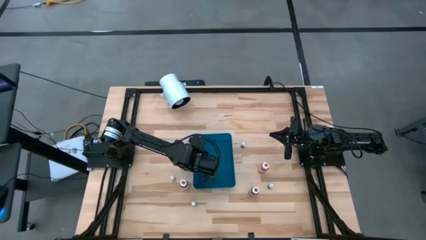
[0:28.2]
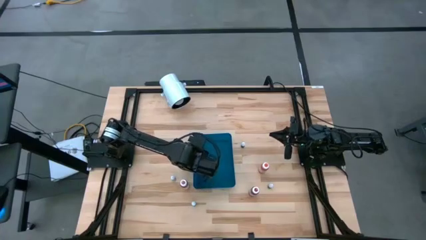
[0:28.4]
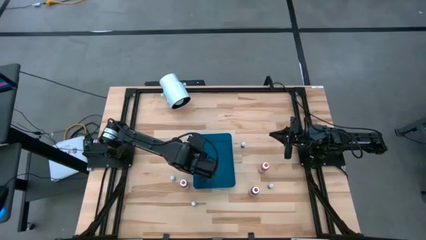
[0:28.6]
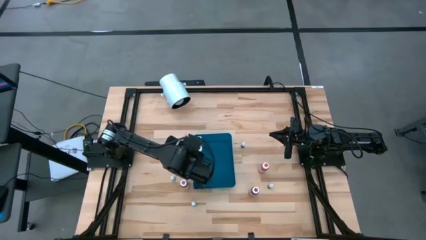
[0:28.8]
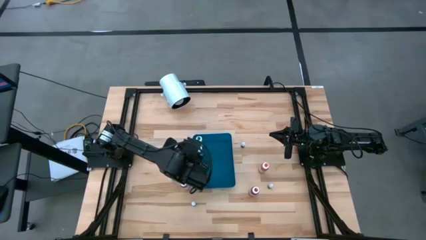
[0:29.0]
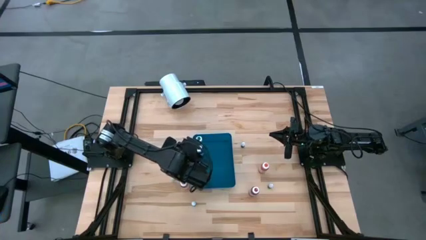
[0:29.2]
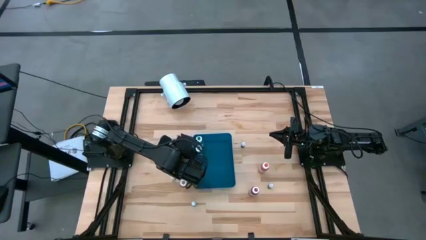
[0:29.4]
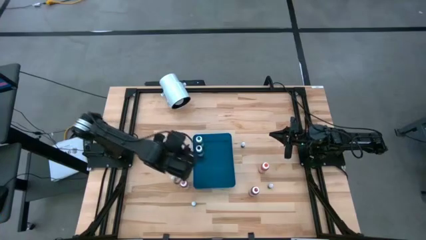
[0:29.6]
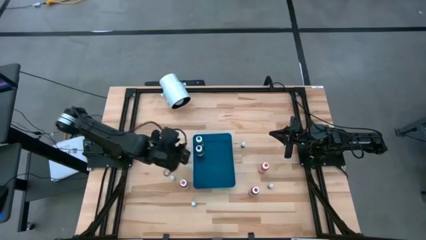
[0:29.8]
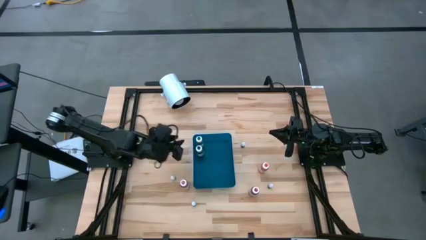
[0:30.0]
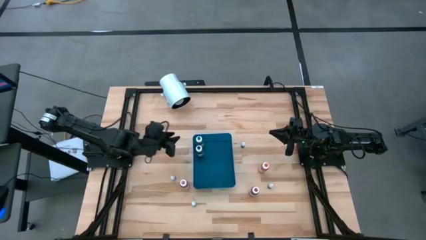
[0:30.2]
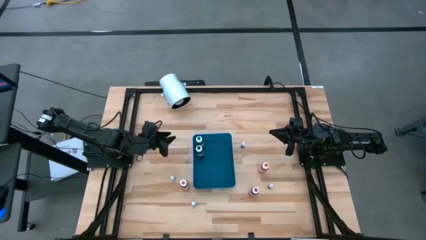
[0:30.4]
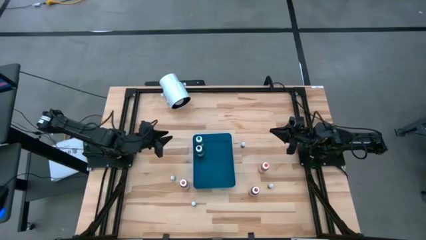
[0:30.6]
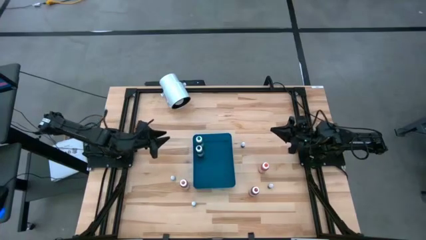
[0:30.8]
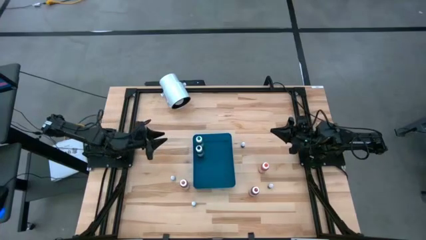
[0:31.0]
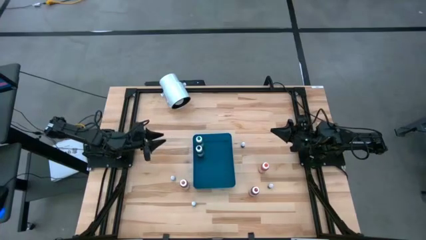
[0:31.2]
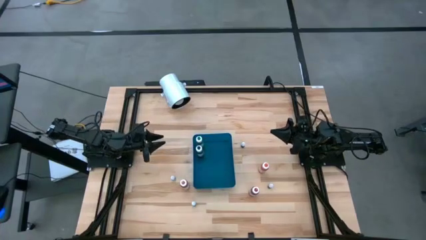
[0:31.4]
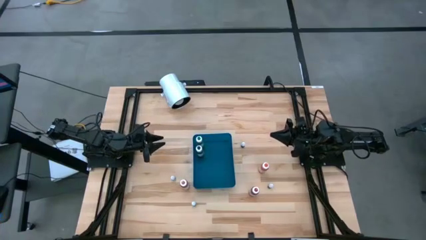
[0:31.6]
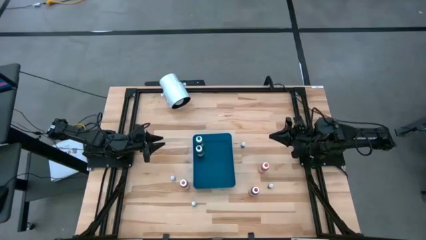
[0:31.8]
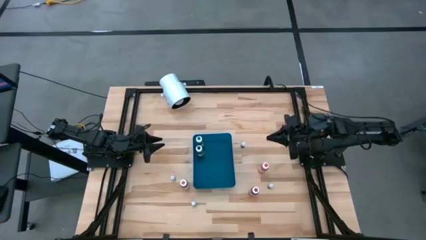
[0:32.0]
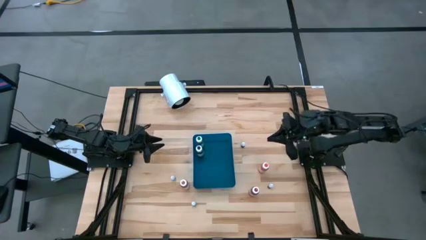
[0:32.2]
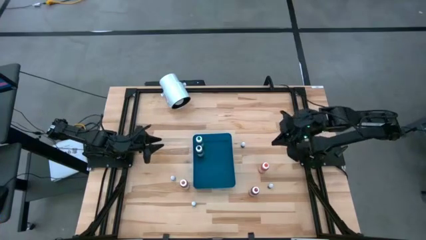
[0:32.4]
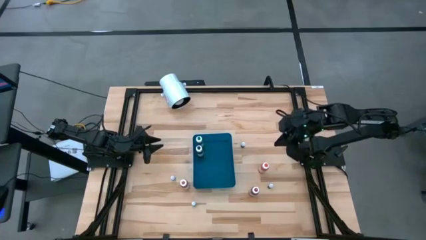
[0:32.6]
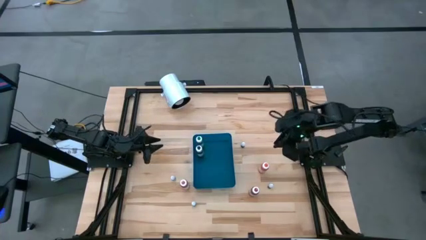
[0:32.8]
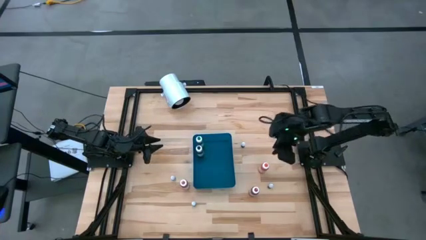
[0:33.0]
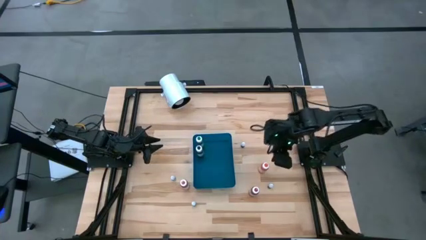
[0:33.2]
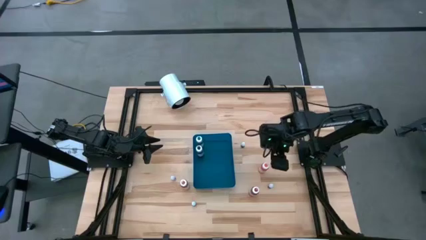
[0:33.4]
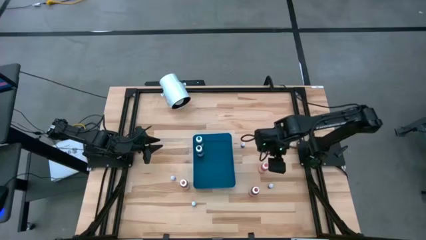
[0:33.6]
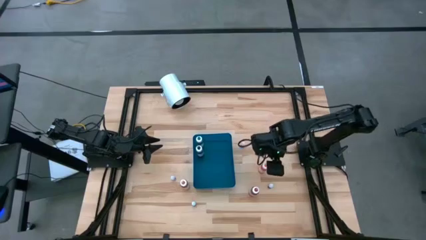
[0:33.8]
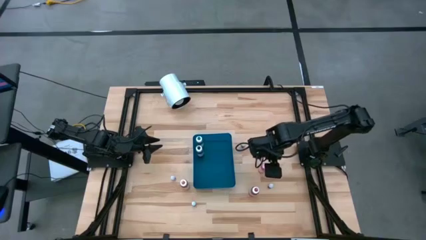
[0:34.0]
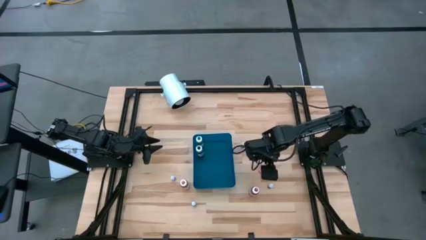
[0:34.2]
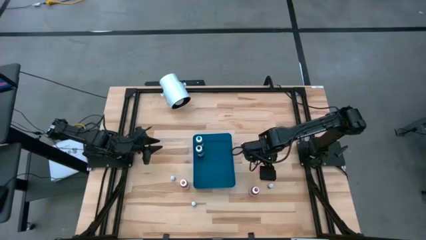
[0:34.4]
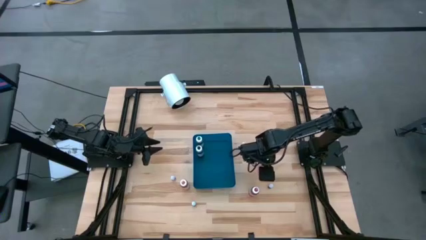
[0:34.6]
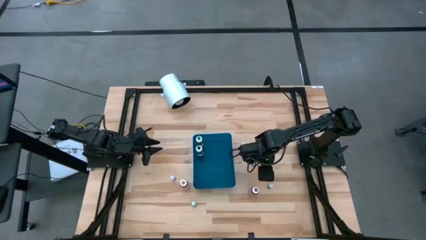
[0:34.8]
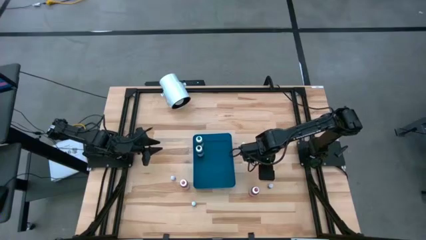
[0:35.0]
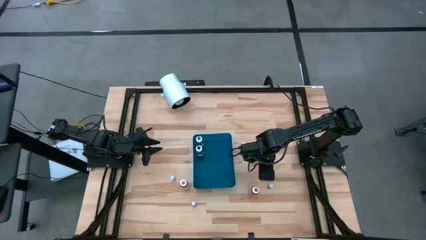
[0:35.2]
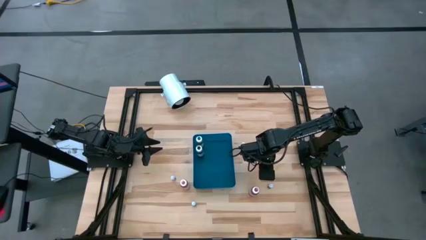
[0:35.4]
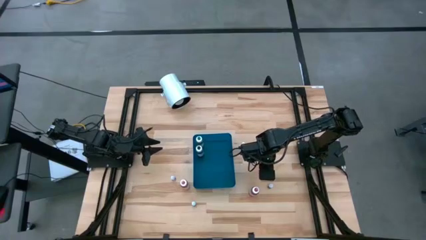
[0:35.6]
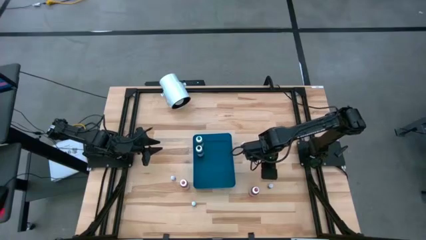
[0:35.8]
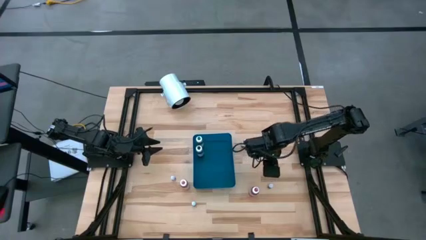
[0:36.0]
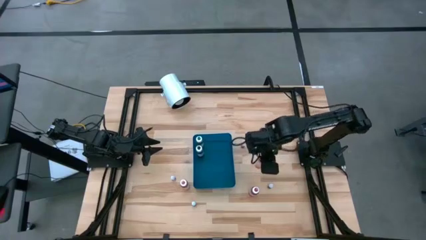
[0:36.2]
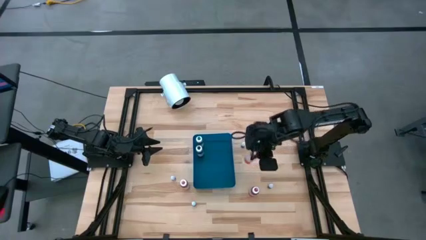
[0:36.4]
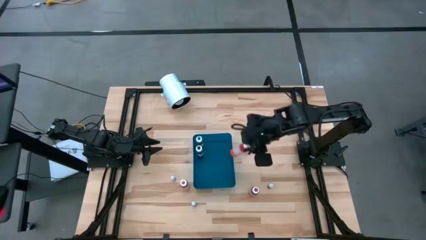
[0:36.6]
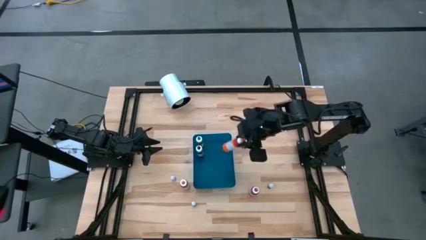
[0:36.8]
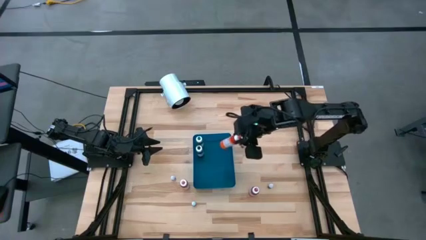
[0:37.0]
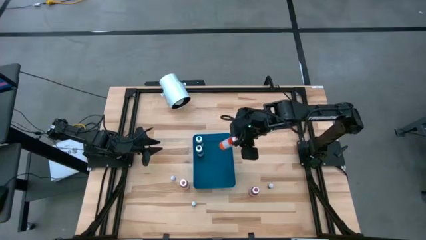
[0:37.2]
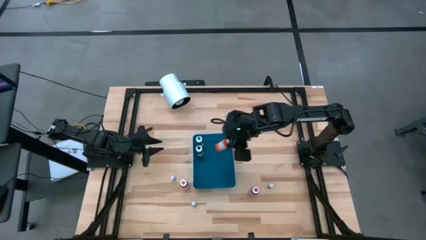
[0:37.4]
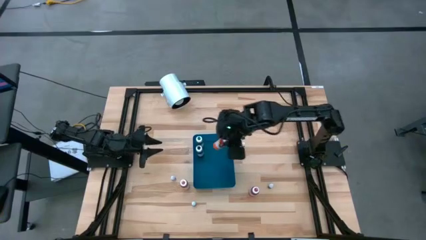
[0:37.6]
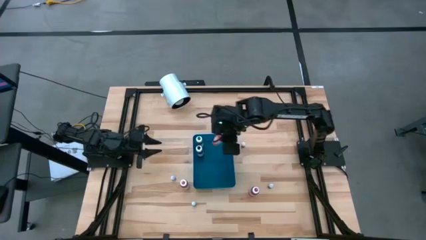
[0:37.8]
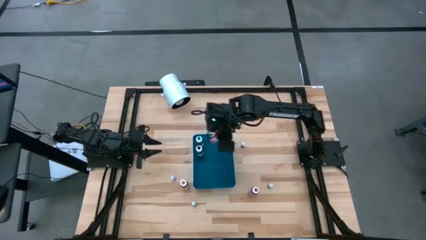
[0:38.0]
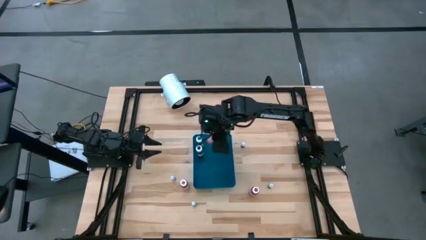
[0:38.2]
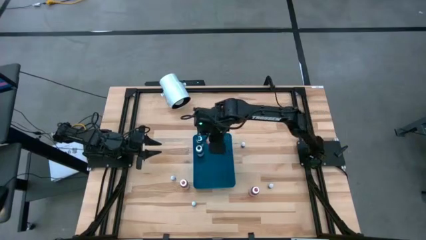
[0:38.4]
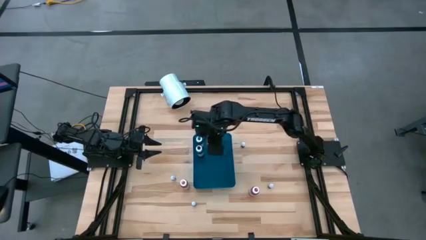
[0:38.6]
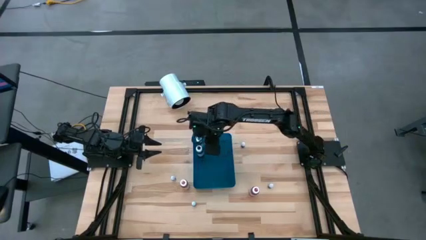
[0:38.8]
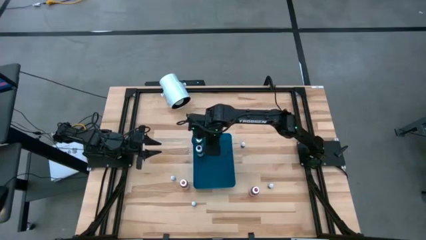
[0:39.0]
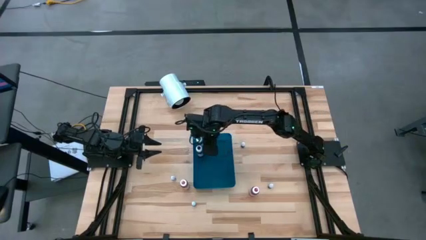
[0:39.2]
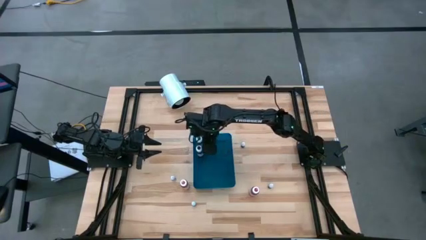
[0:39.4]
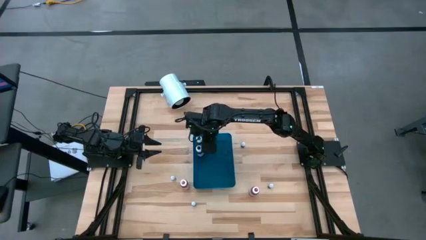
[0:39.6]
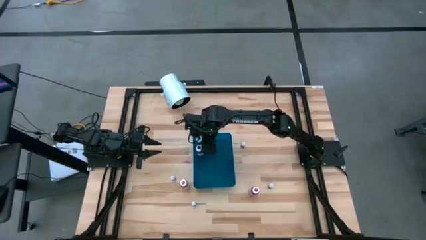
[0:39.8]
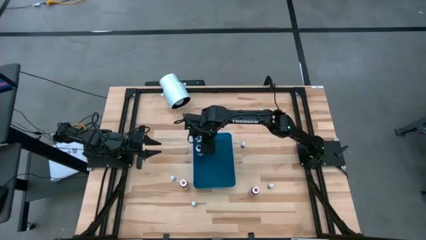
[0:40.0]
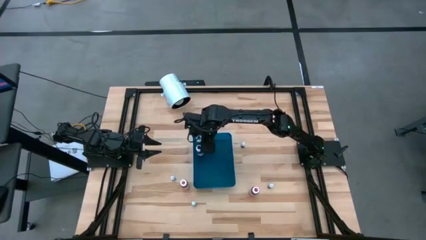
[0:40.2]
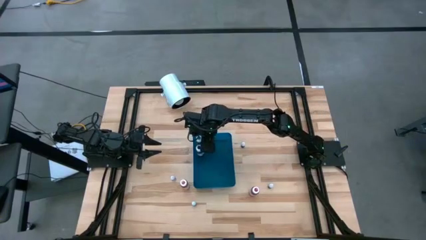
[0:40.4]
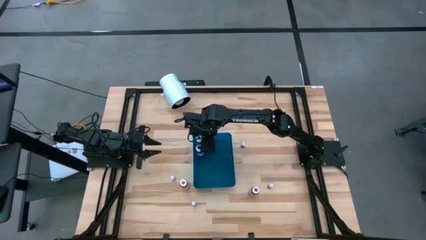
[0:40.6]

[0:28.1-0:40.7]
Task: Pick & Place food coloring
Put the large orange food coloring bottle into the blue bin
